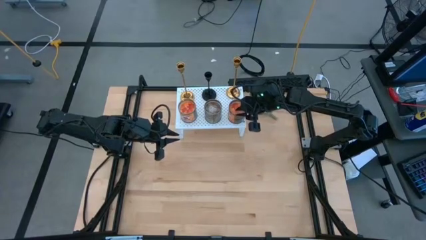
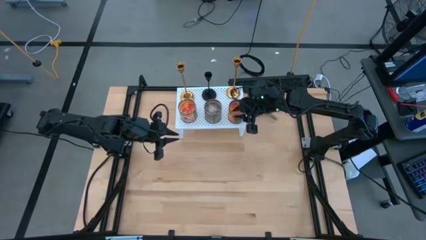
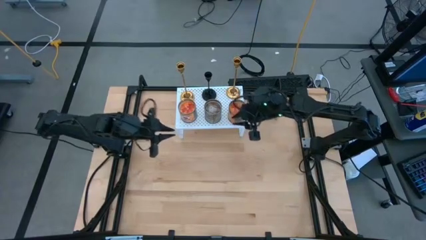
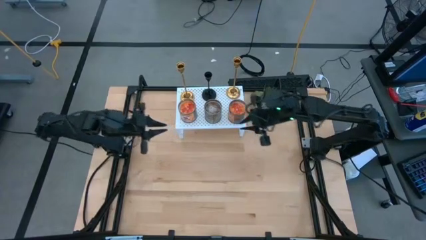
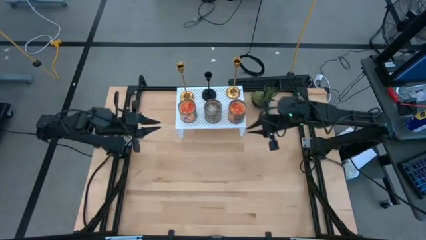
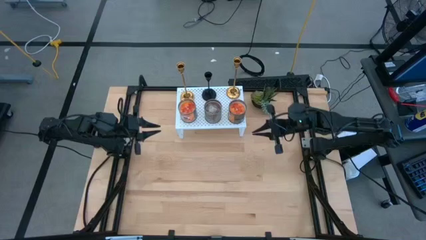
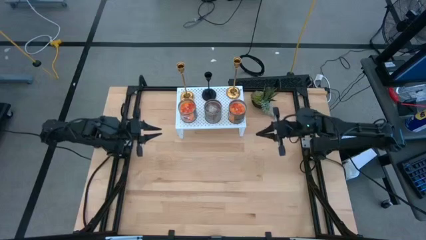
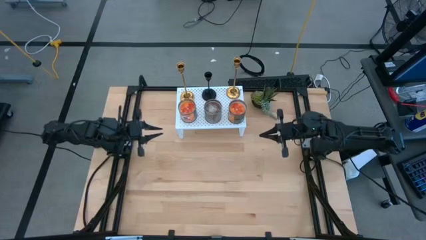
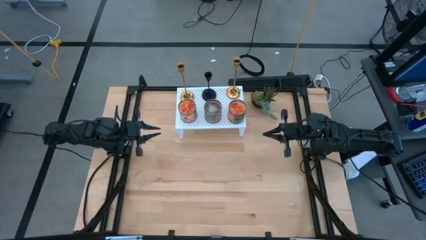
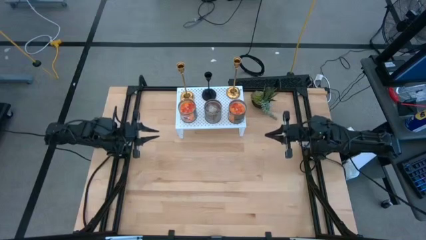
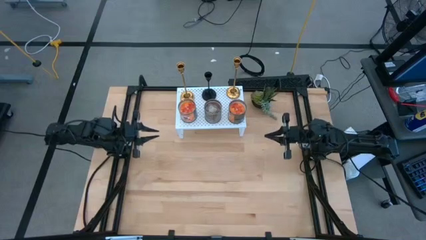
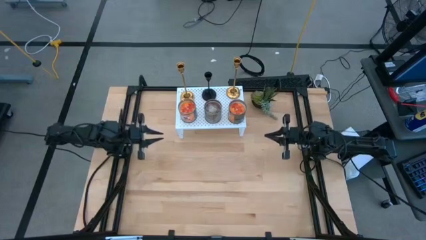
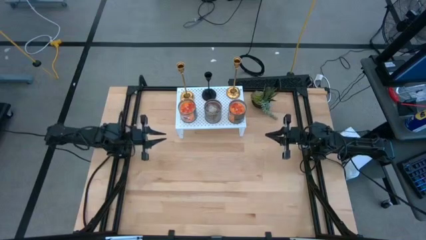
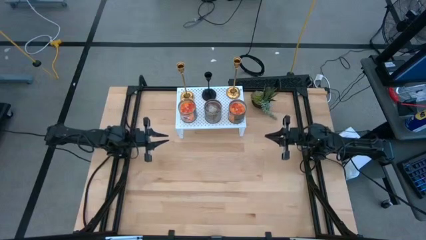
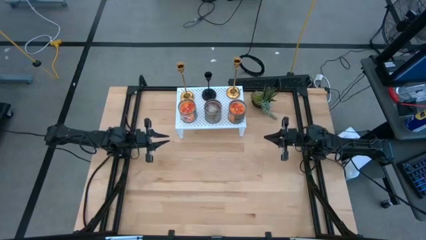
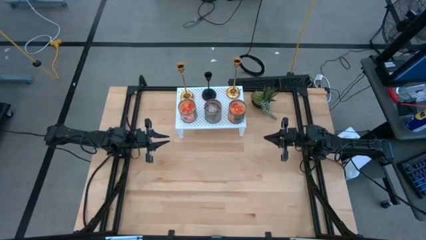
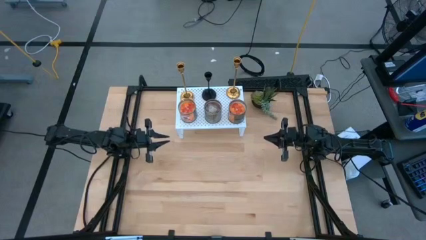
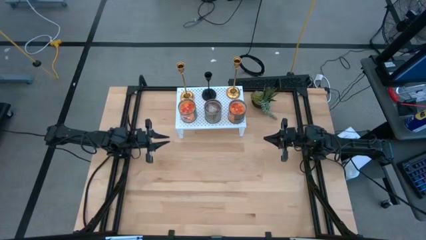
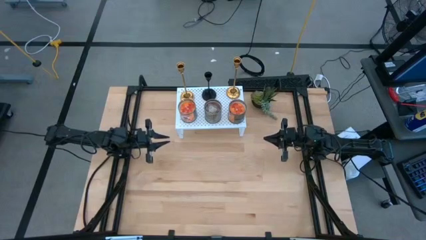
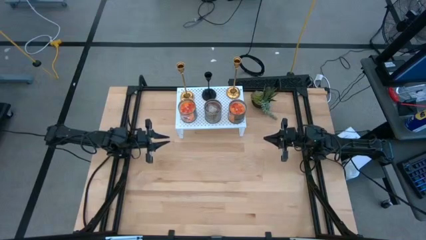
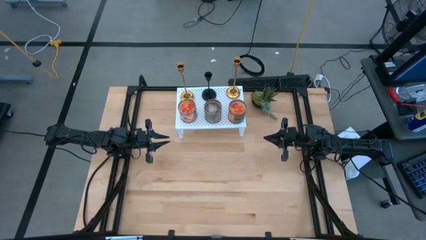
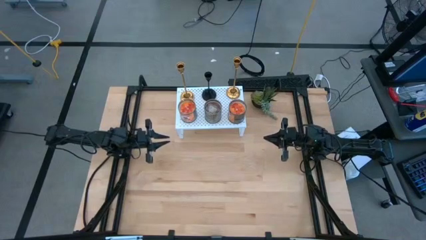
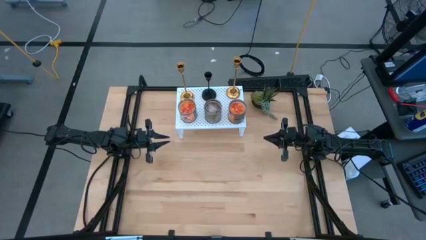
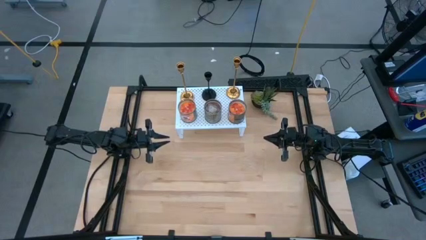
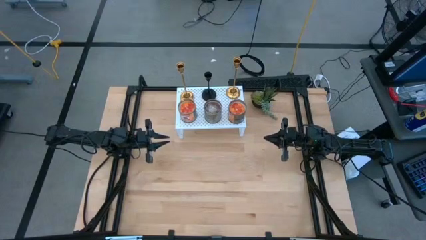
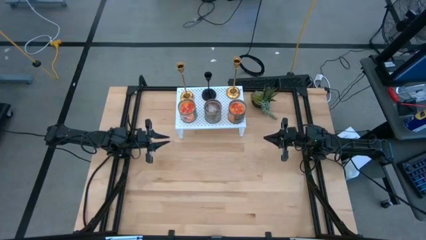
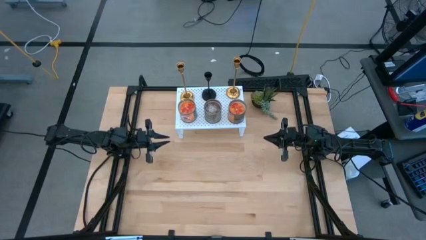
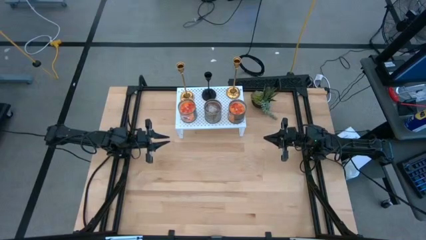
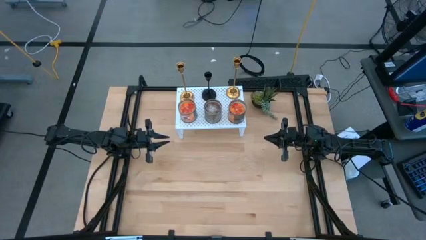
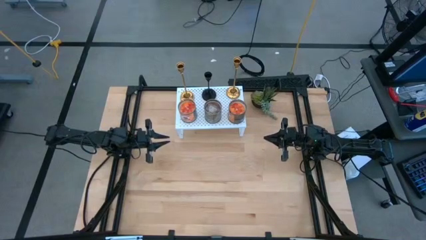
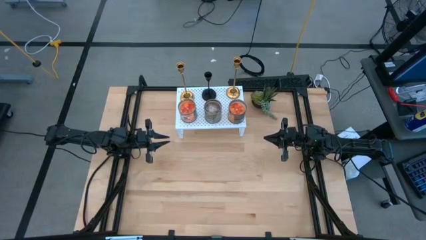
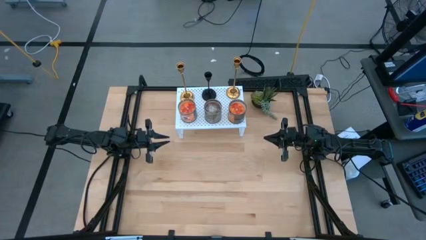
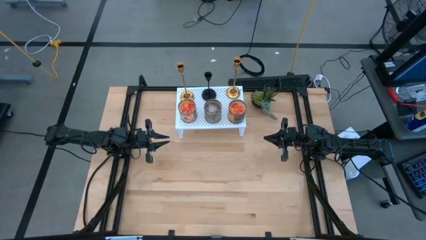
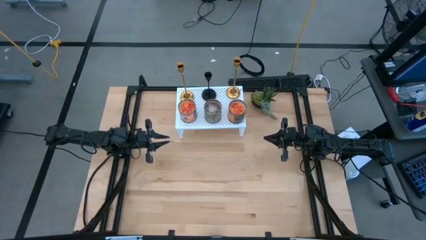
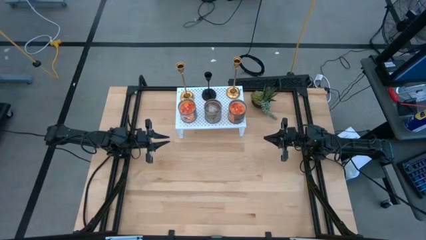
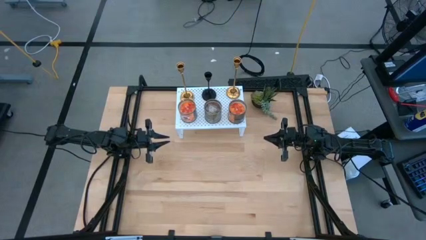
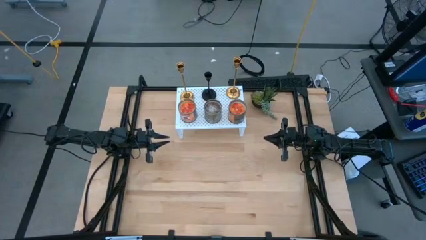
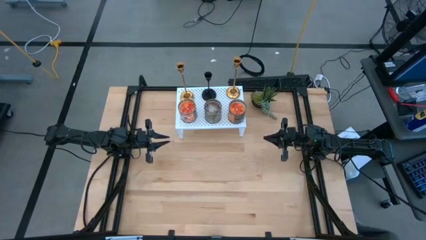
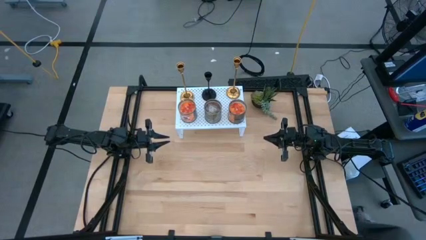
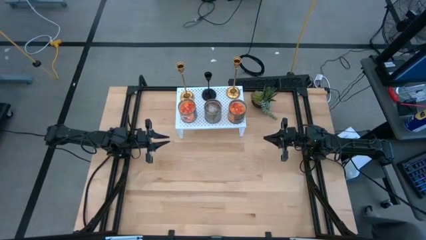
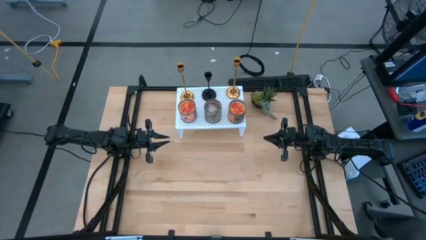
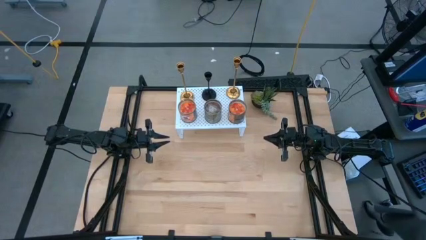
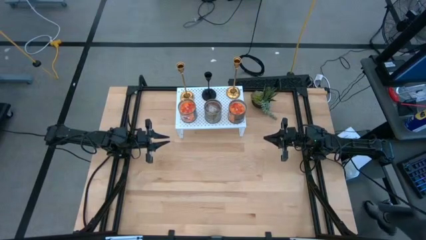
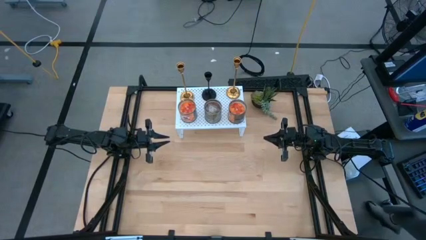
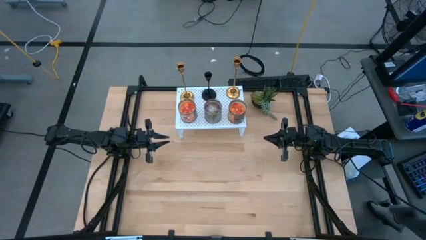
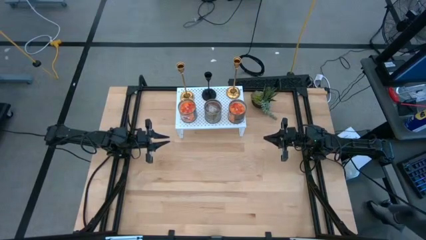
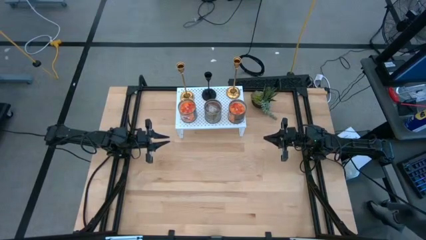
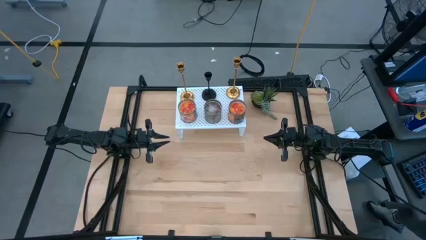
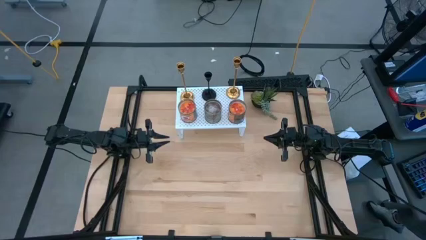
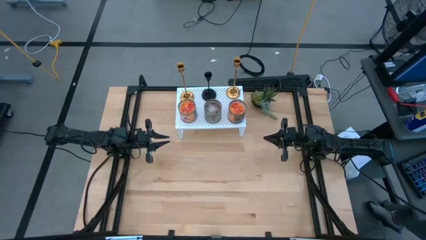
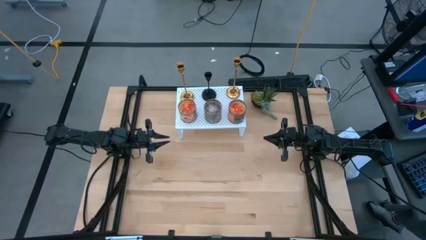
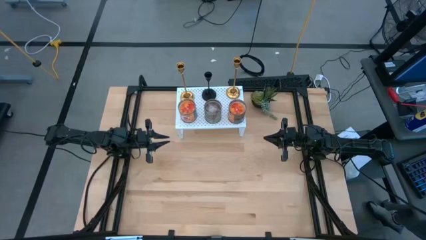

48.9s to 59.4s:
Task: Pick & Place candle stick holders
Return to Home Position

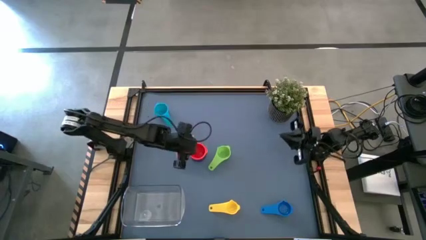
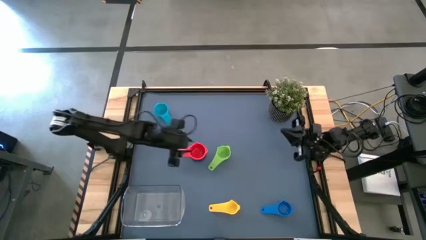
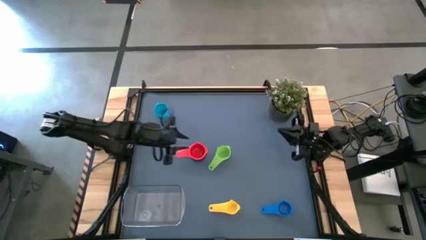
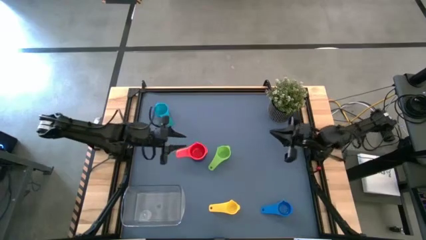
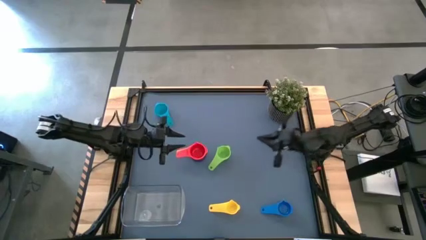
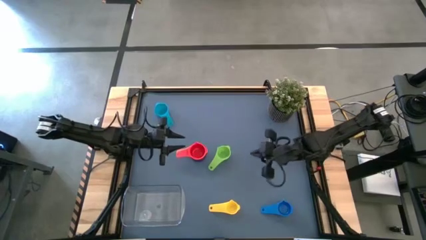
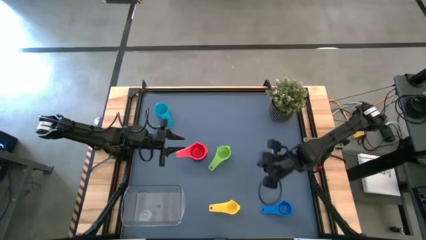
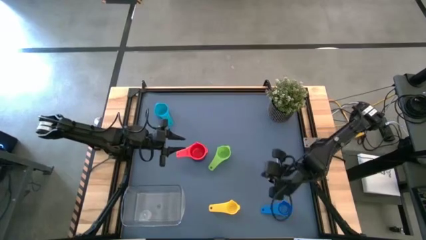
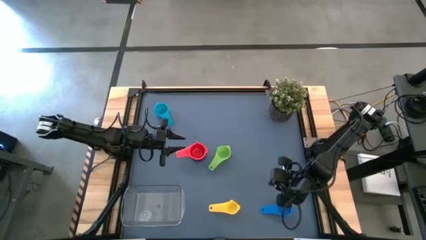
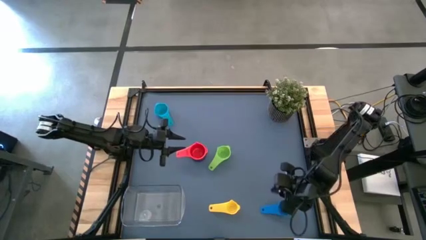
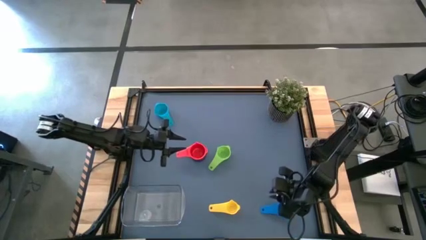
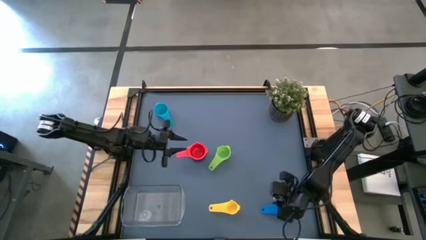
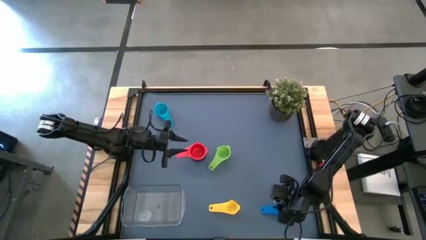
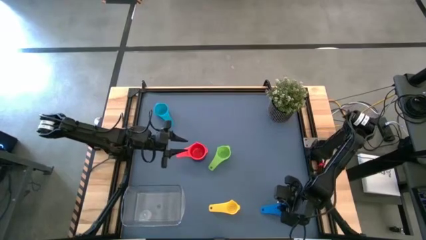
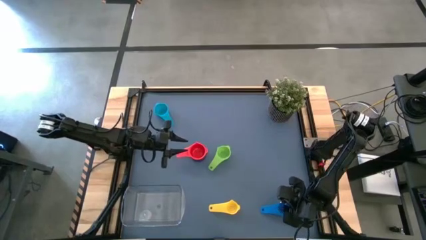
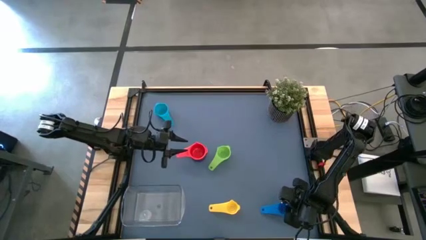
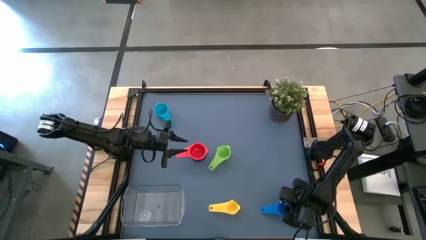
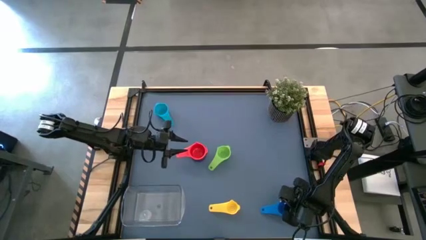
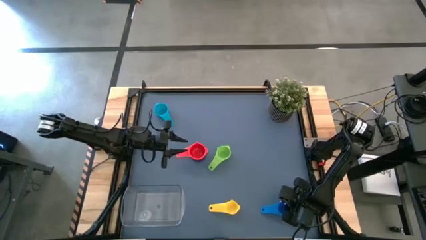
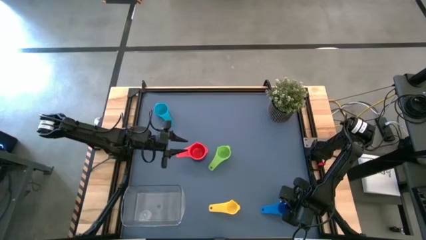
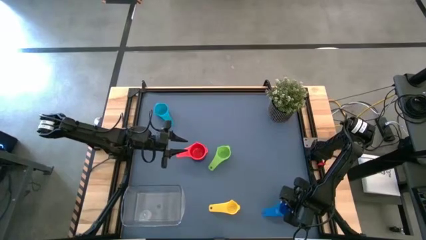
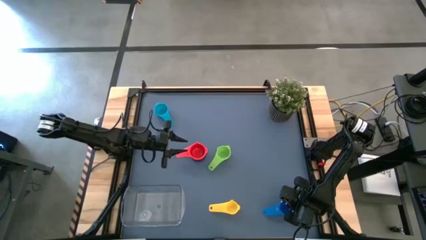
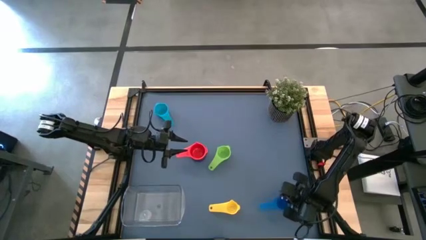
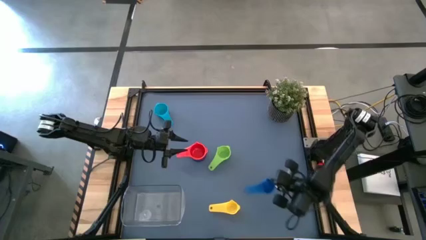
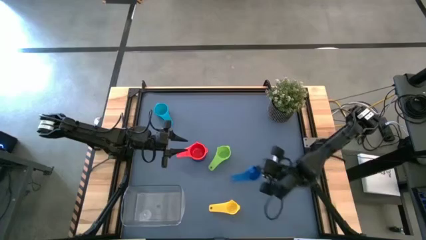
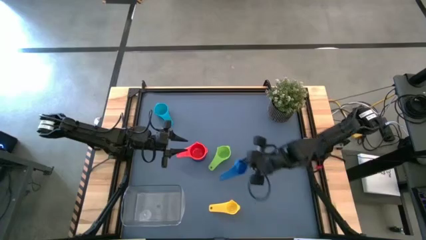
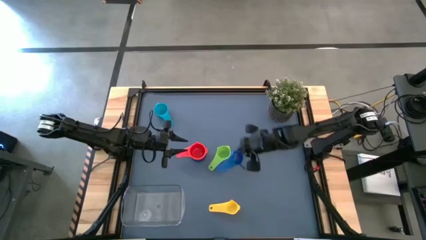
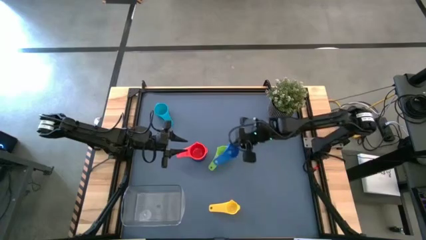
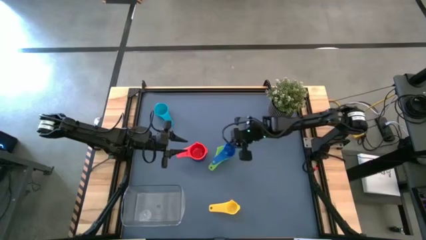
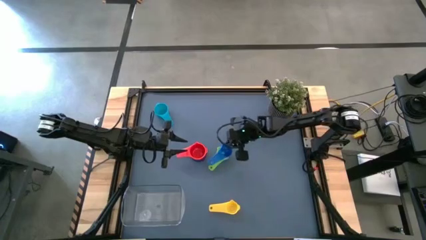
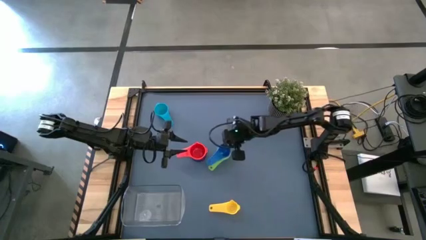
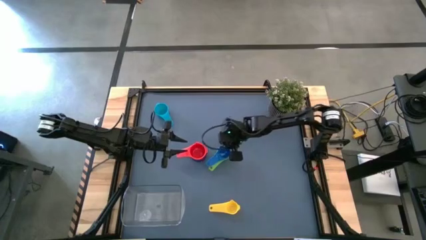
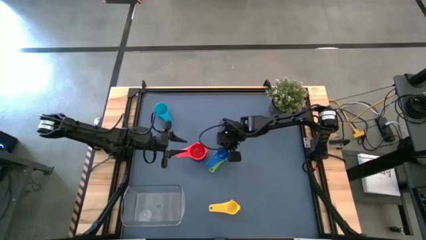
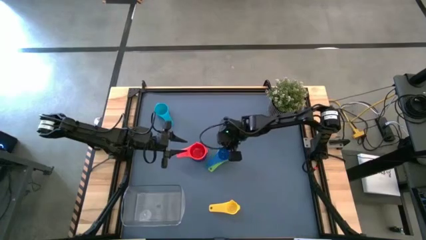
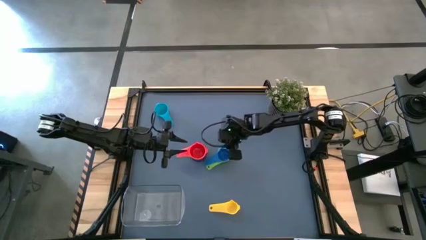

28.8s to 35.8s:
Task: Nest measuring cups in basket
Stack the blue measuring cup on top of the green measuring cup
